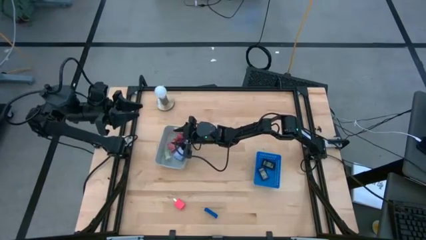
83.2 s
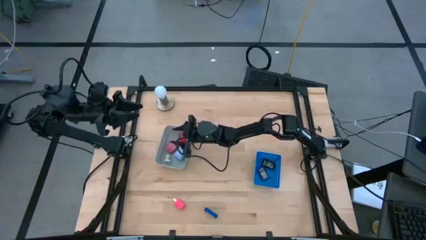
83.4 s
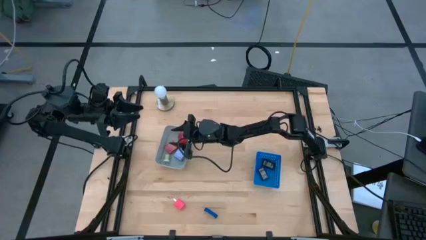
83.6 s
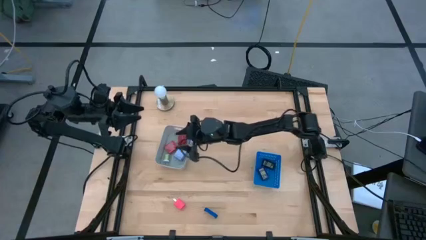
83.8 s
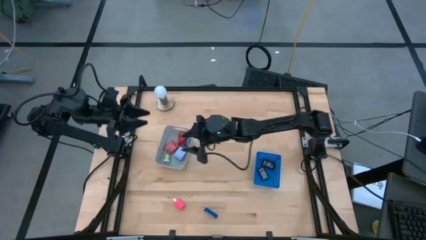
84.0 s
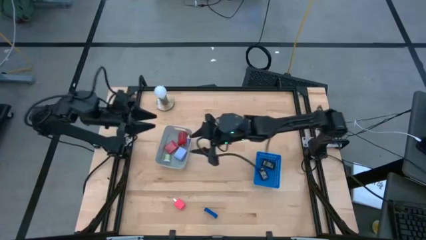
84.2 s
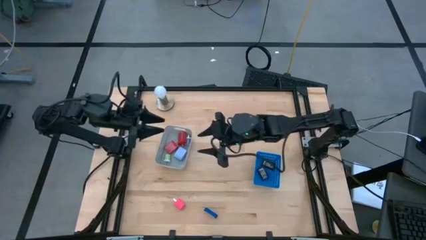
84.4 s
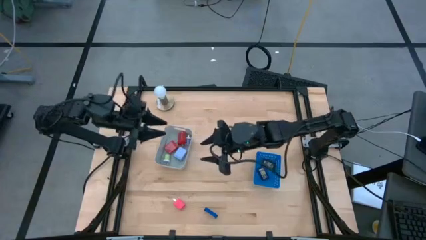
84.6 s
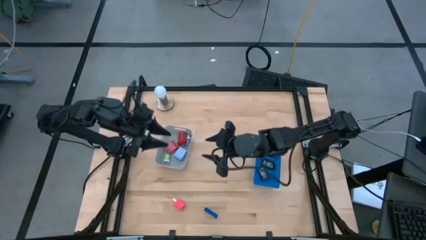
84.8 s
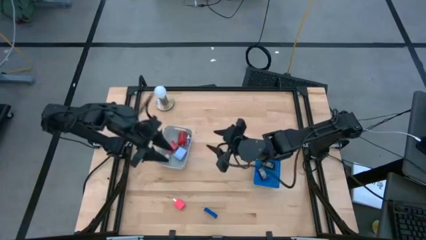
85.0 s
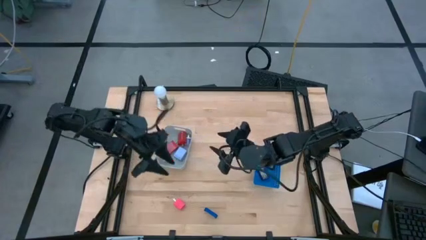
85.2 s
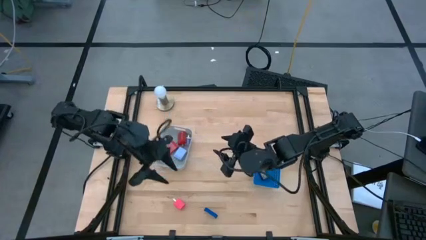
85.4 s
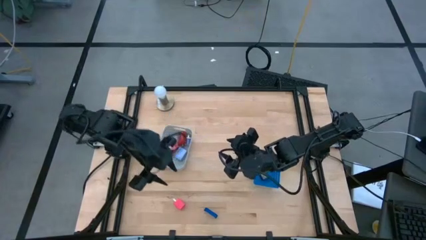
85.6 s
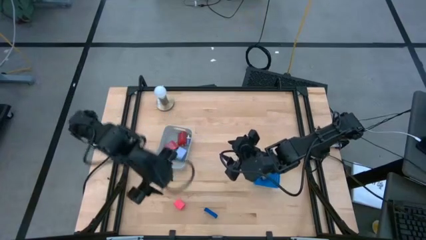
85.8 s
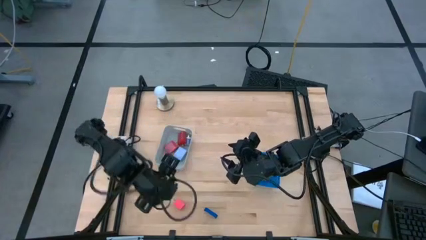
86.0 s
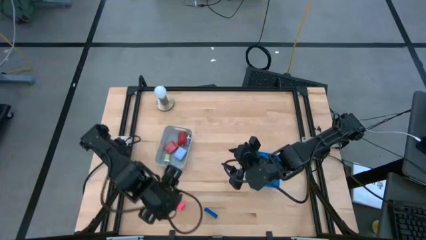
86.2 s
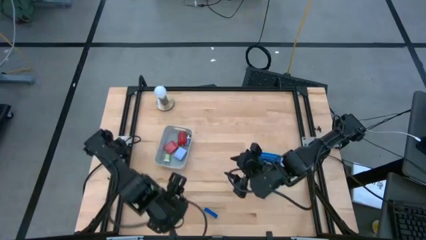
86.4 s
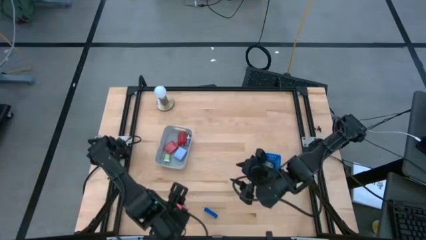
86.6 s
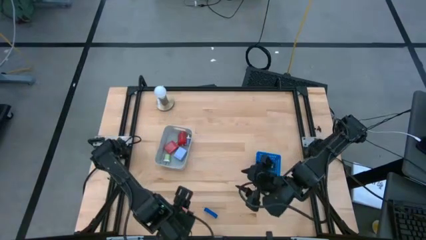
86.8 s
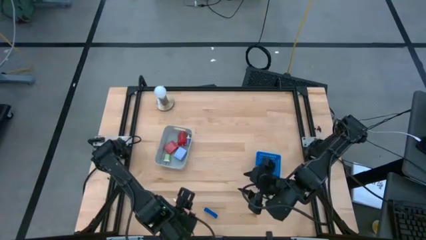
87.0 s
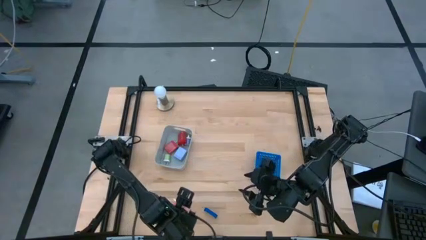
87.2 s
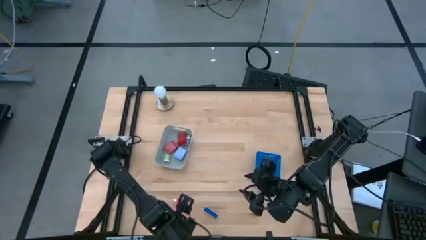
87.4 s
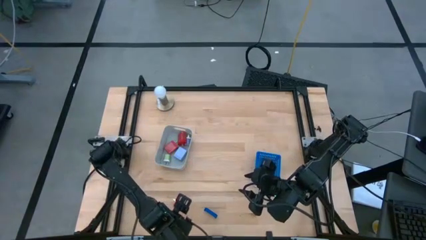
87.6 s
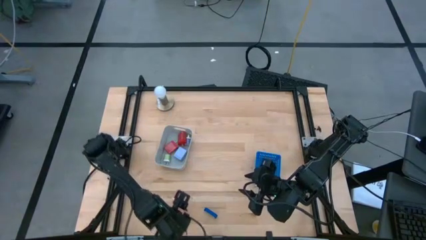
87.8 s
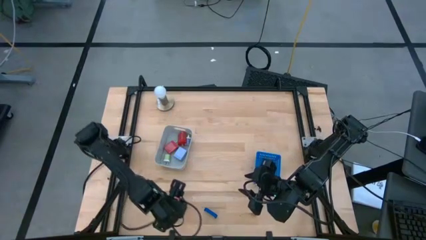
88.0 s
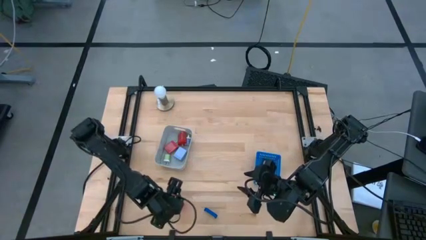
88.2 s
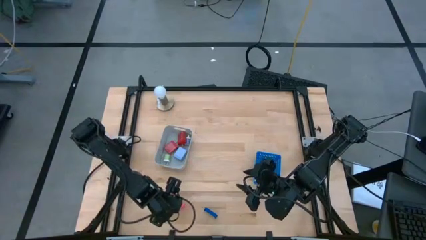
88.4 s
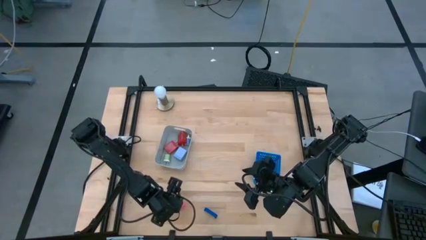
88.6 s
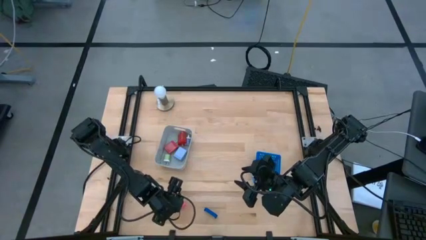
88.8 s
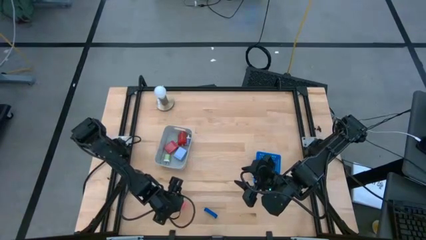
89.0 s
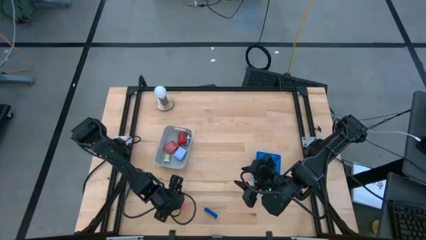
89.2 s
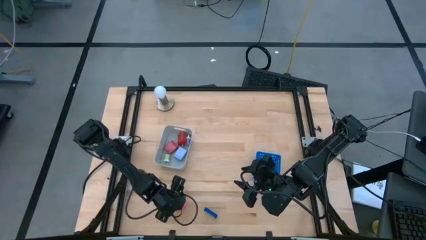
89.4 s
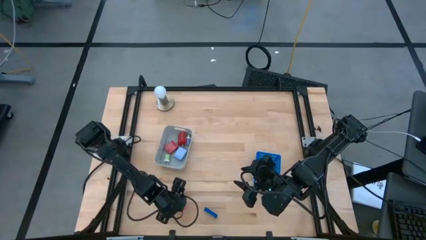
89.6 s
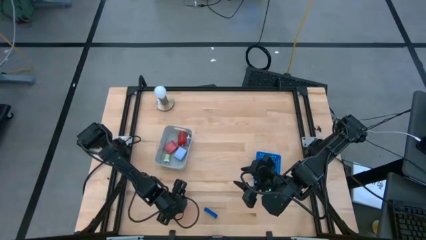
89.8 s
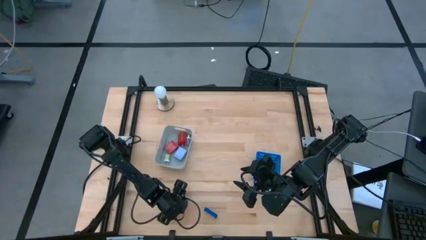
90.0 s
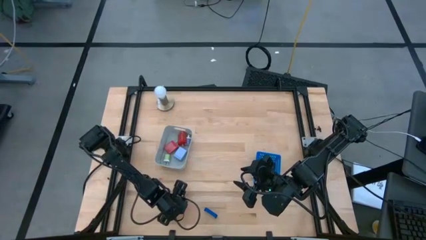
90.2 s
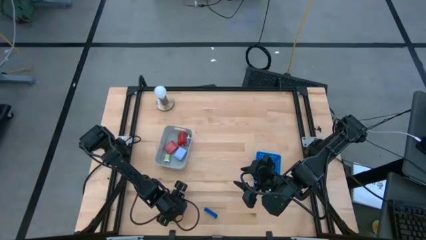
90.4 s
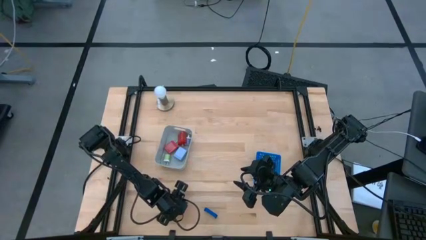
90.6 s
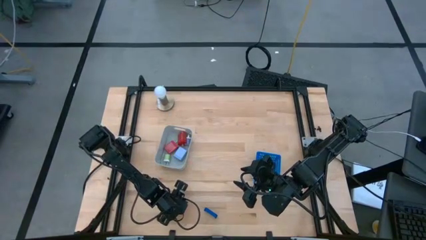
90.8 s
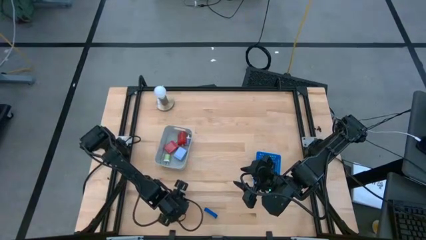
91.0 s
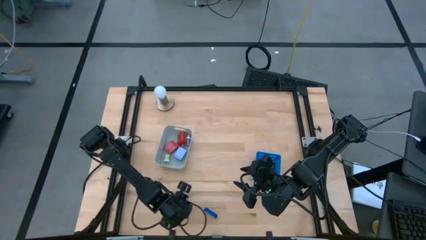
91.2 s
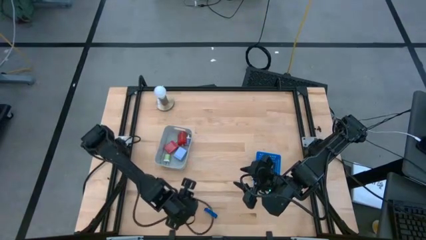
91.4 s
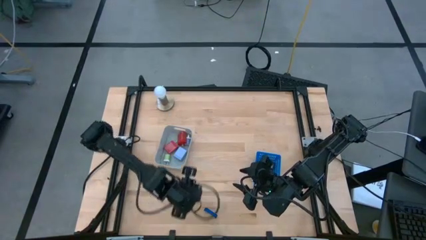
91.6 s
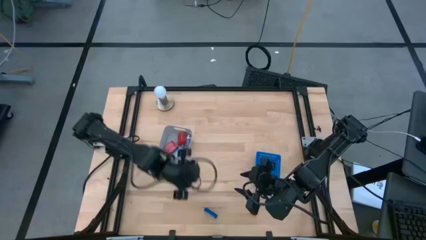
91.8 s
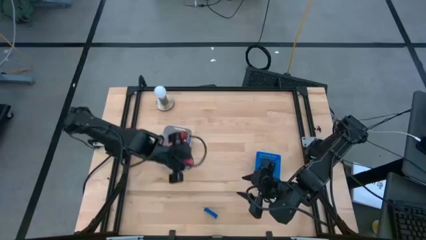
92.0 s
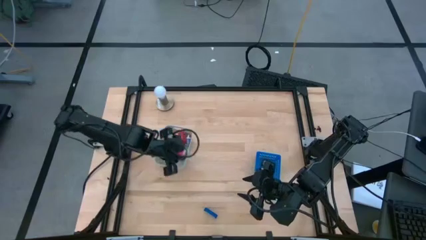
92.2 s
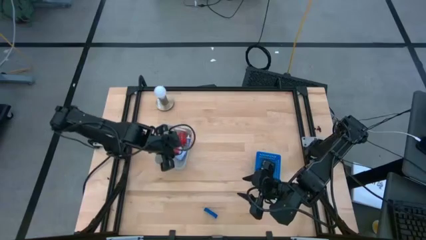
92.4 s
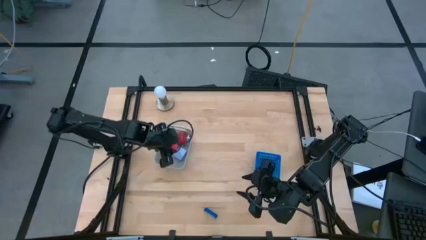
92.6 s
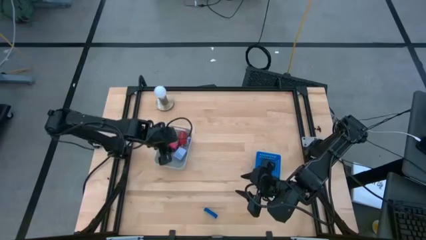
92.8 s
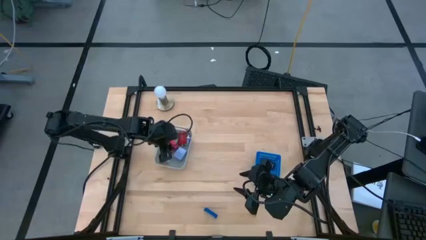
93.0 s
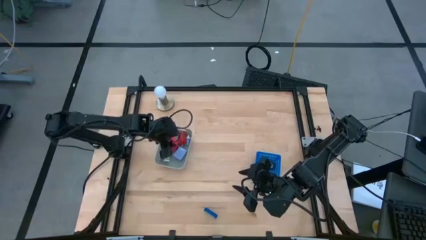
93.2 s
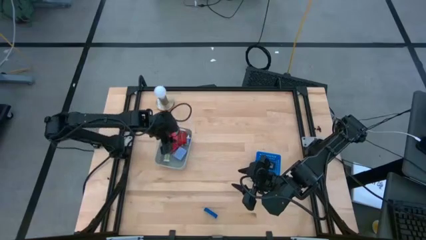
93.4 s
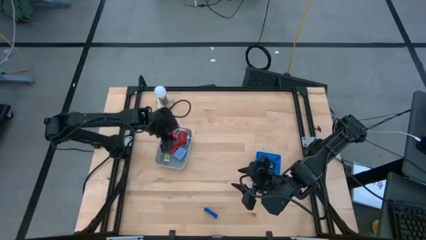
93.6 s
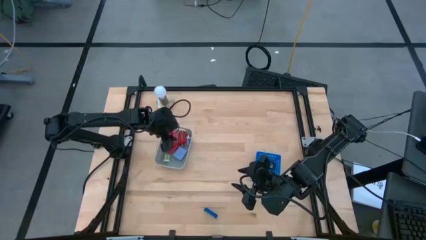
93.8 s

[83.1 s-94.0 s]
Task: Pick & Place Office items
Put the pink charger adapter into the gray bin

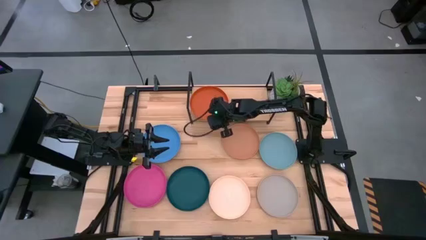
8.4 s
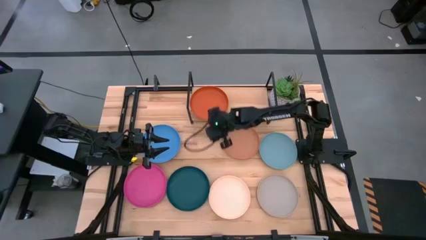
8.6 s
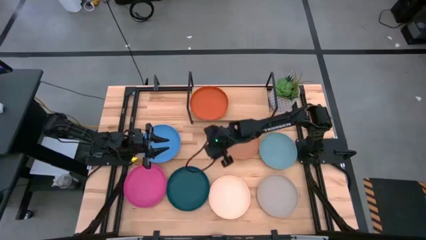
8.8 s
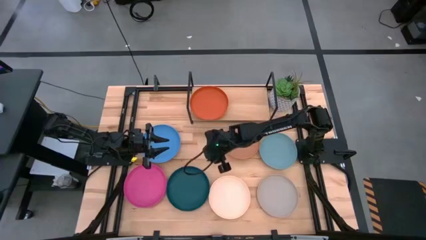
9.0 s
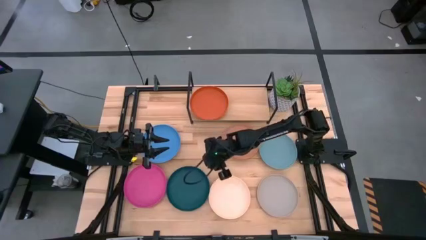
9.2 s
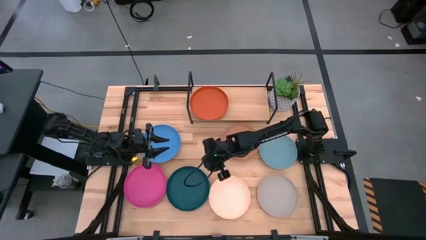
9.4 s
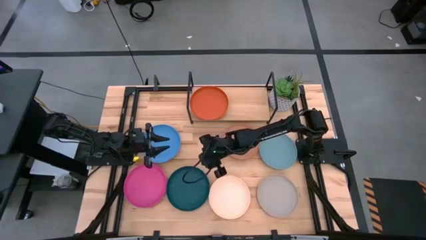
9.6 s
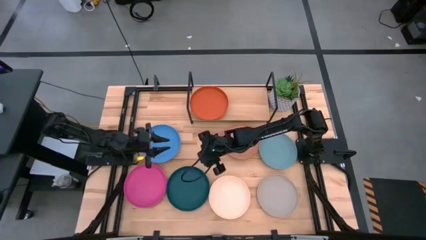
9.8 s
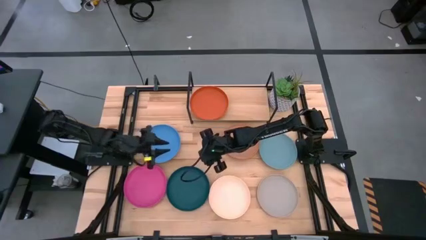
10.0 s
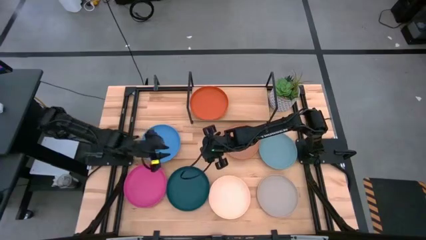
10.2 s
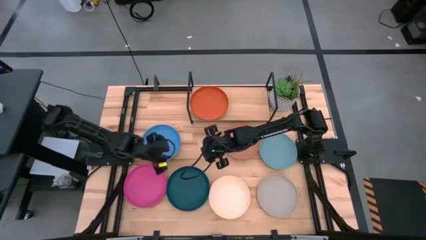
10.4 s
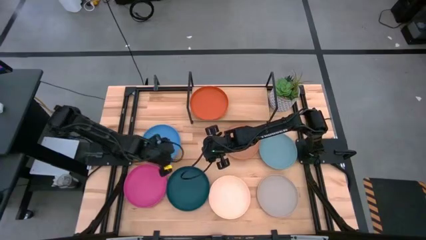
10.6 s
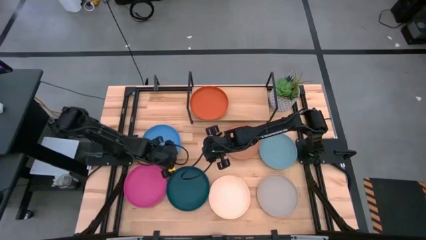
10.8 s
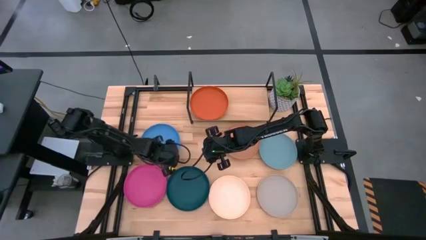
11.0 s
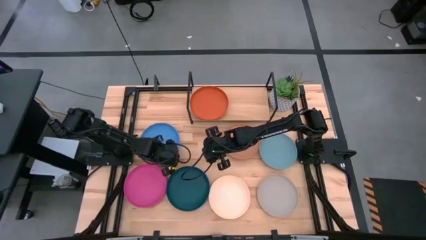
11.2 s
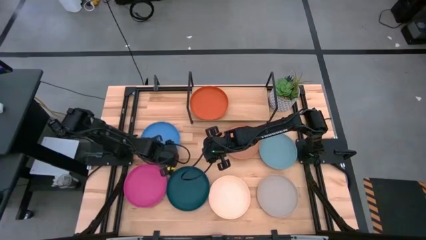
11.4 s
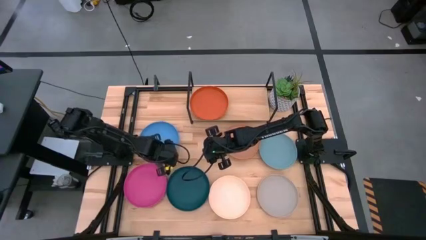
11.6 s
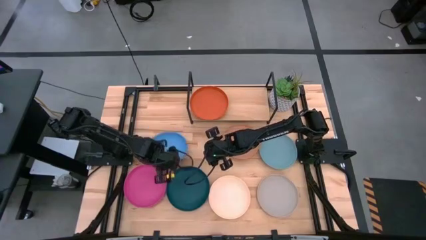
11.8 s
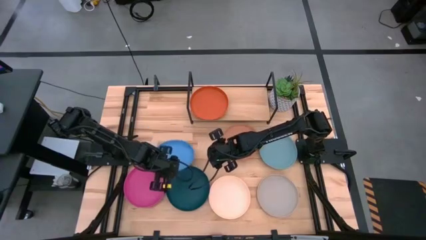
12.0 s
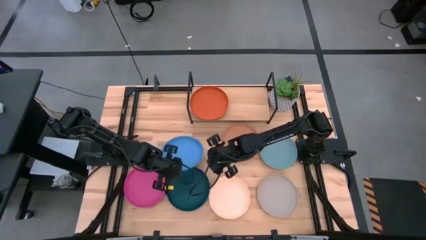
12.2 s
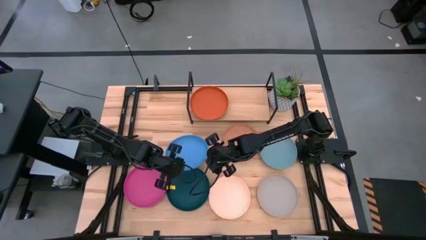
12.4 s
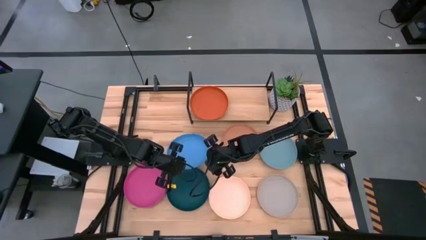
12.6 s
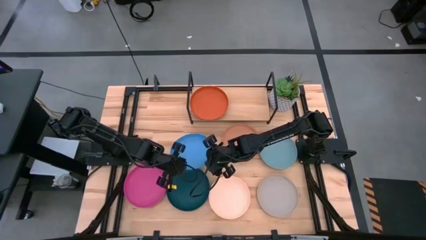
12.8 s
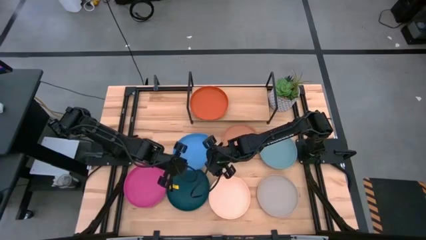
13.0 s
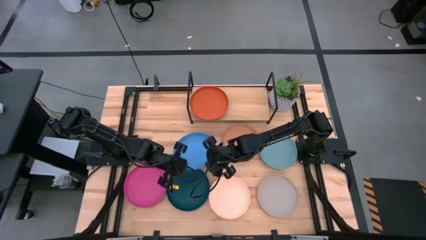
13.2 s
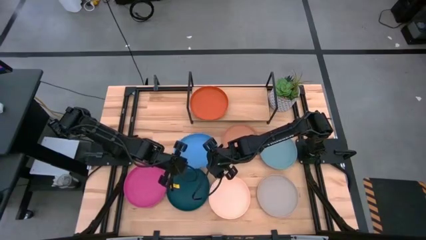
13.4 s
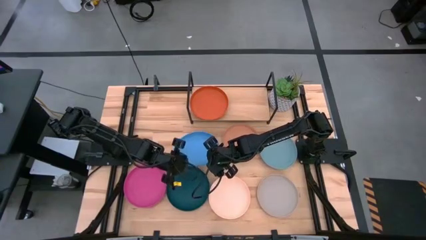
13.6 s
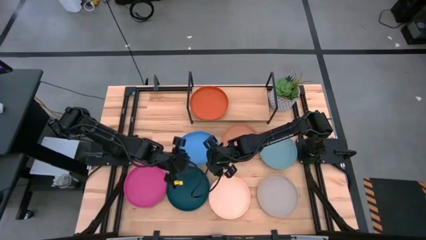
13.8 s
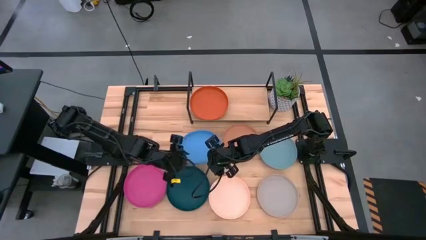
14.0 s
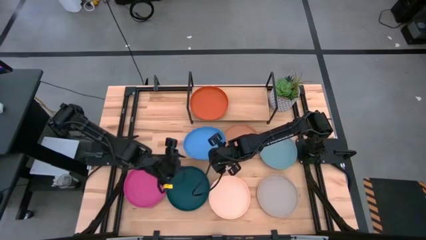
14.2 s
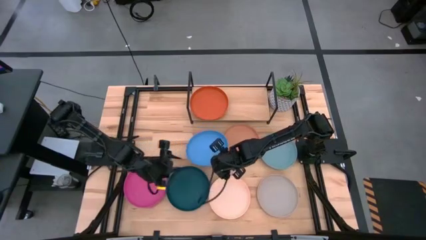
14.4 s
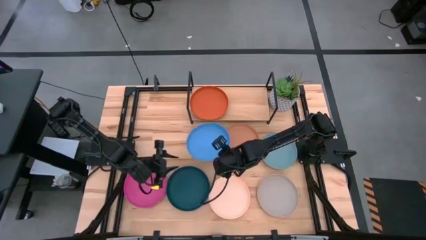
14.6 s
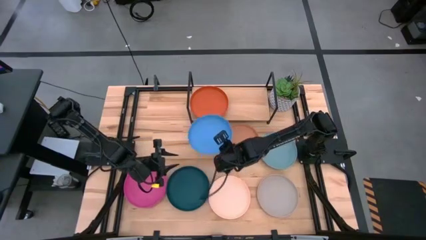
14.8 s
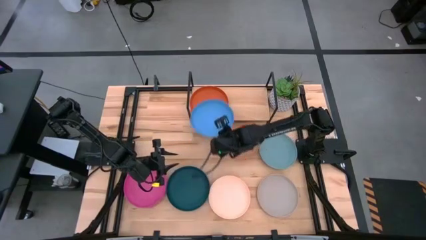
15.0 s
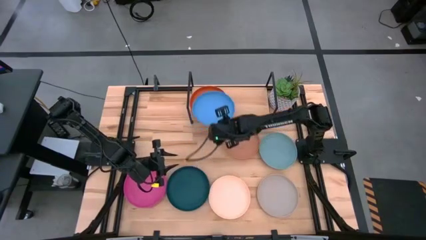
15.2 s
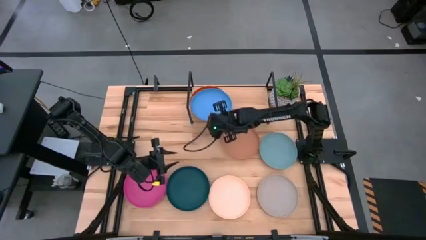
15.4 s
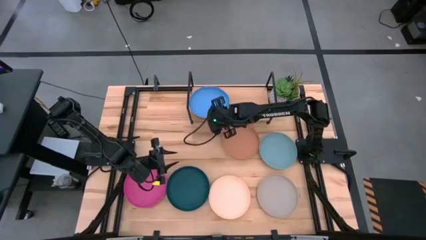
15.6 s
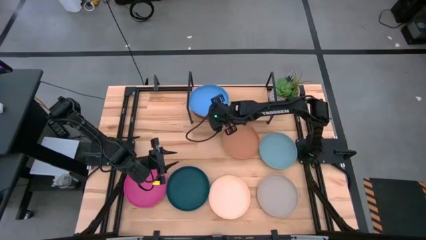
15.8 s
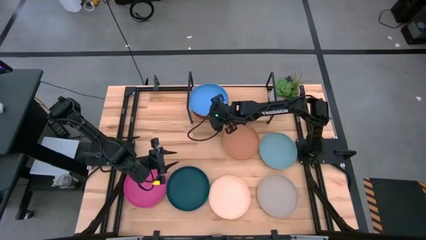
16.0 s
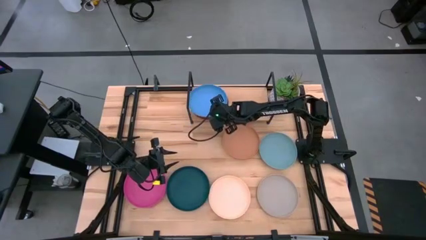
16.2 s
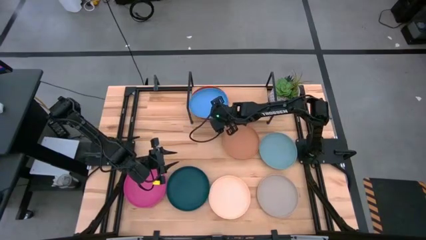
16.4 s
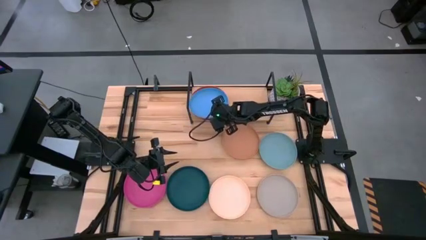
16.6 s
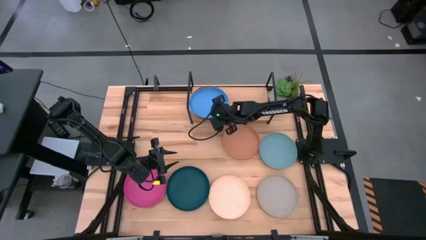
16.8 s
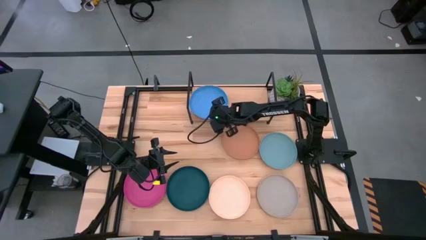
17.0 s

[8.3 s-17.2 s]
Task: Place and stack plates onto a shelf
Stack the blue plate on top of the orange plate on the shelf
